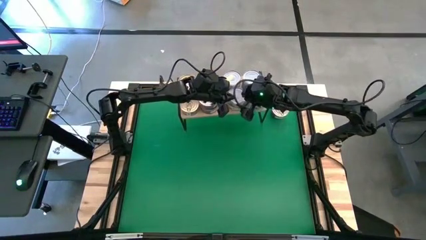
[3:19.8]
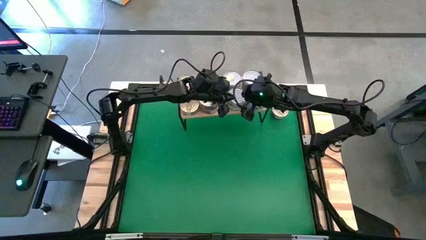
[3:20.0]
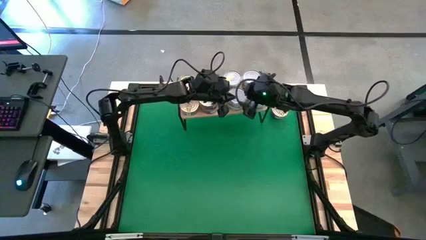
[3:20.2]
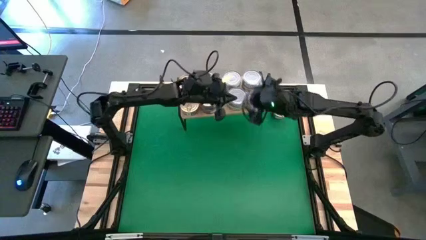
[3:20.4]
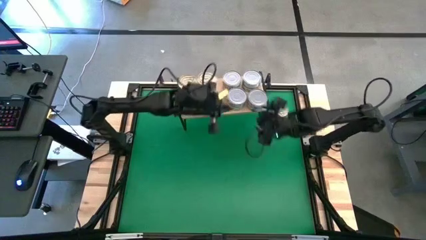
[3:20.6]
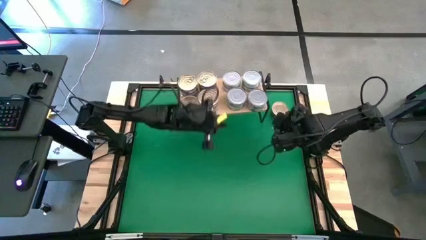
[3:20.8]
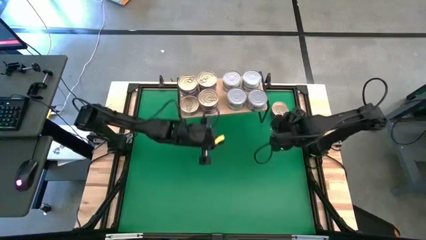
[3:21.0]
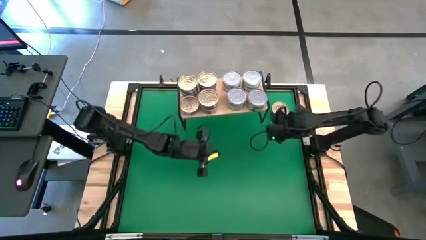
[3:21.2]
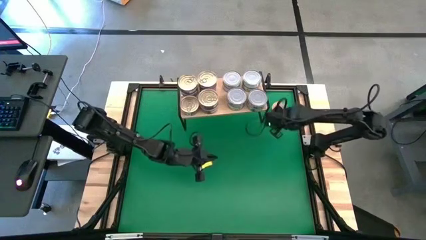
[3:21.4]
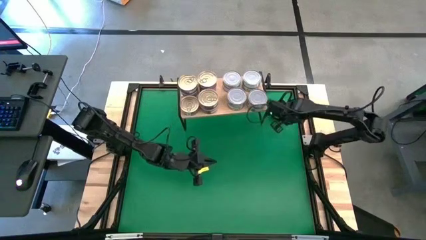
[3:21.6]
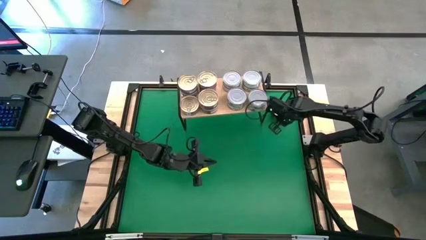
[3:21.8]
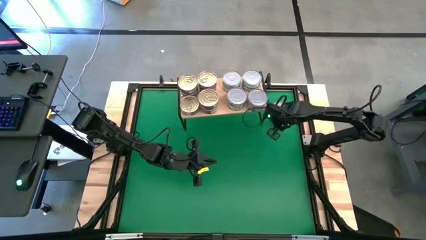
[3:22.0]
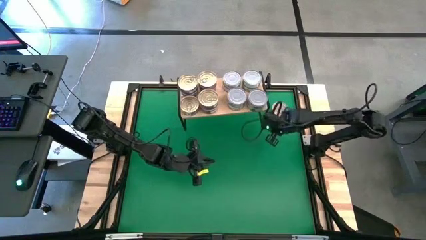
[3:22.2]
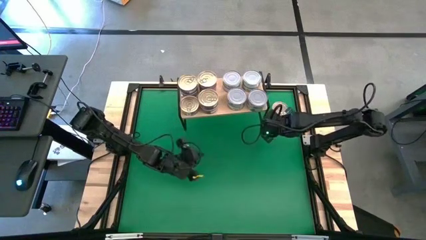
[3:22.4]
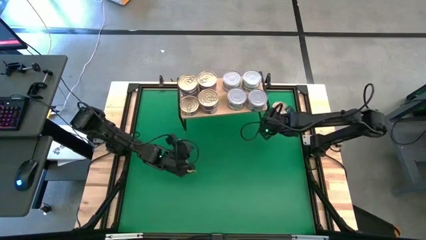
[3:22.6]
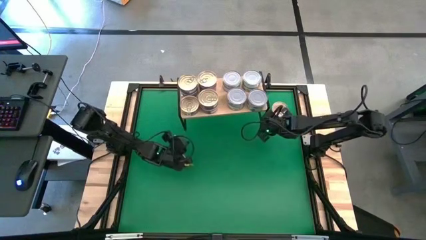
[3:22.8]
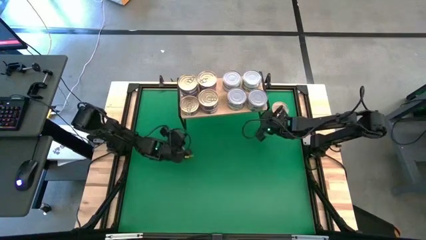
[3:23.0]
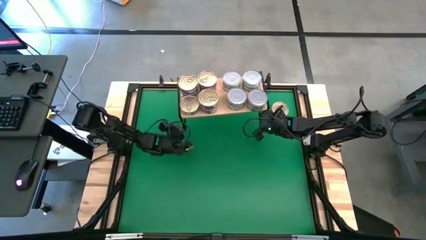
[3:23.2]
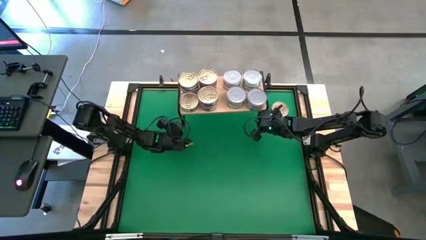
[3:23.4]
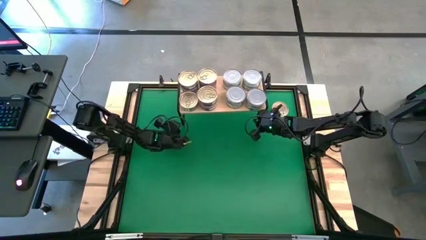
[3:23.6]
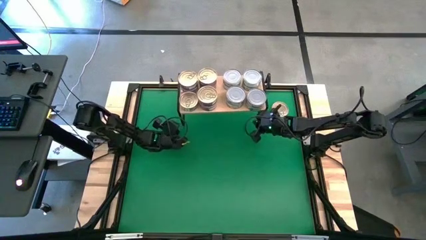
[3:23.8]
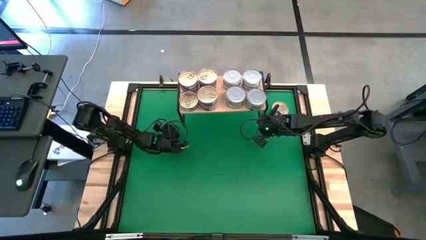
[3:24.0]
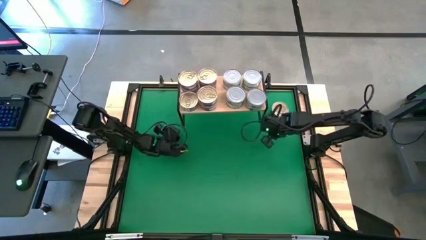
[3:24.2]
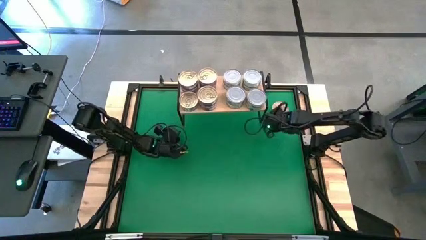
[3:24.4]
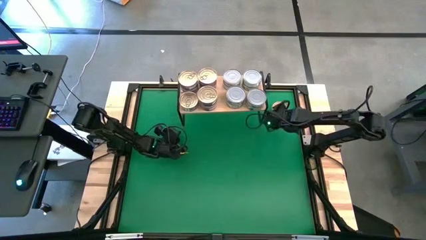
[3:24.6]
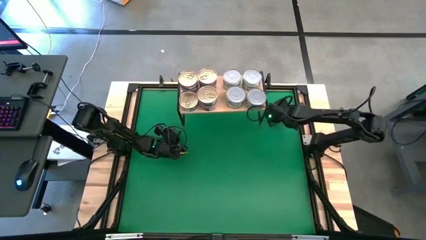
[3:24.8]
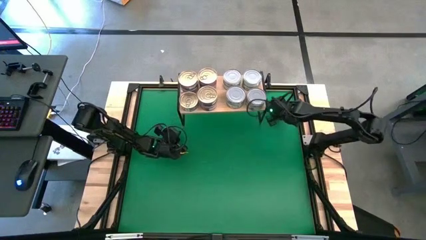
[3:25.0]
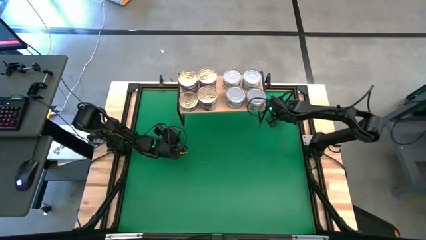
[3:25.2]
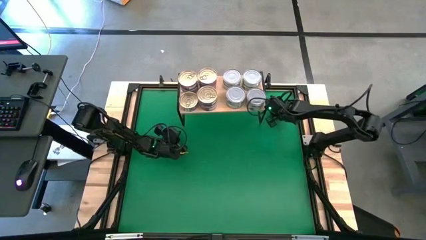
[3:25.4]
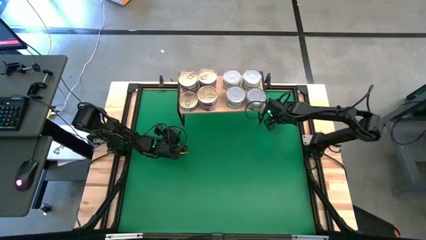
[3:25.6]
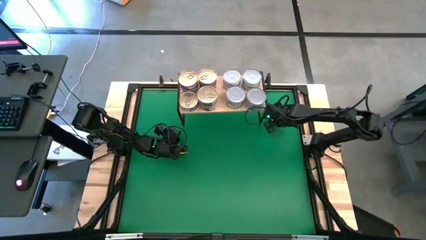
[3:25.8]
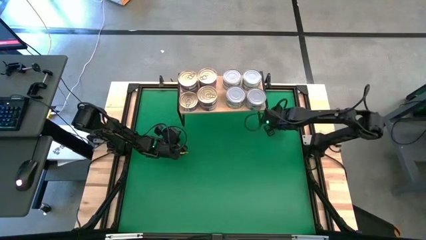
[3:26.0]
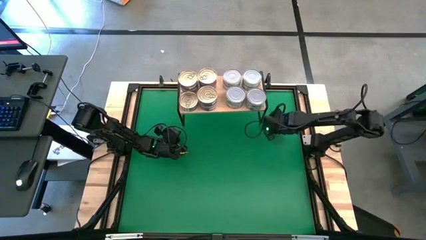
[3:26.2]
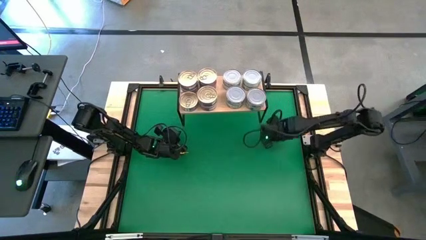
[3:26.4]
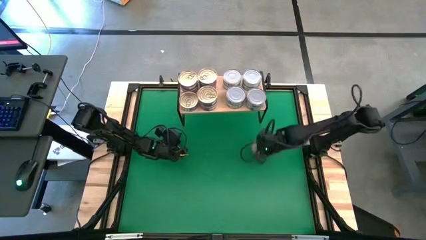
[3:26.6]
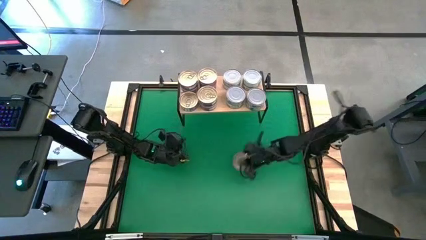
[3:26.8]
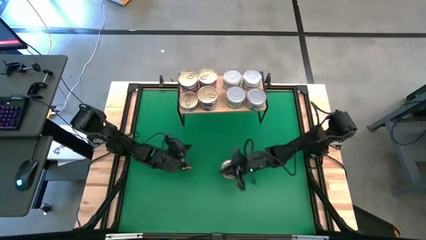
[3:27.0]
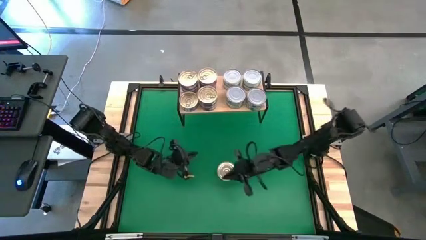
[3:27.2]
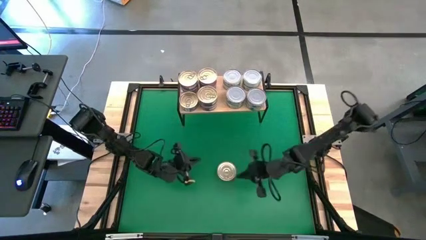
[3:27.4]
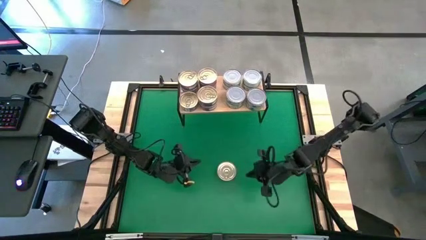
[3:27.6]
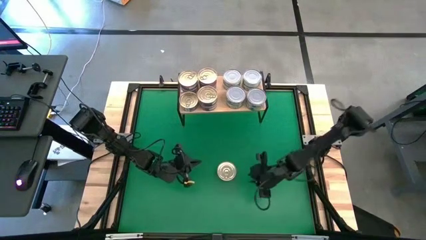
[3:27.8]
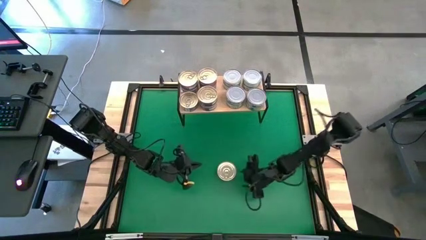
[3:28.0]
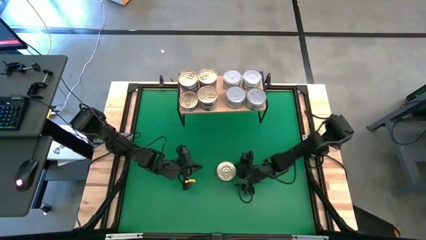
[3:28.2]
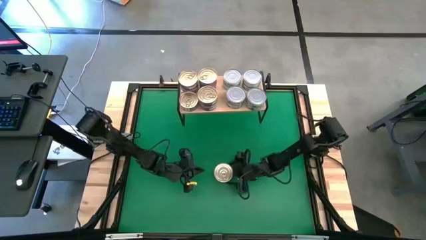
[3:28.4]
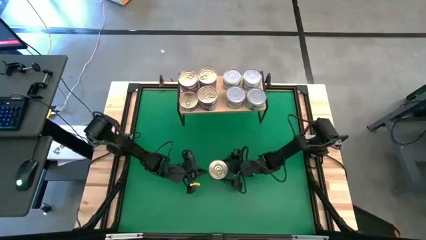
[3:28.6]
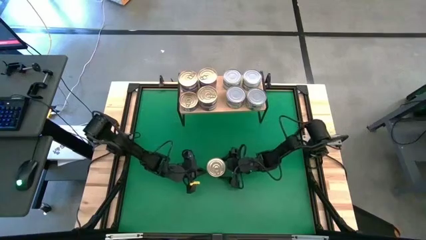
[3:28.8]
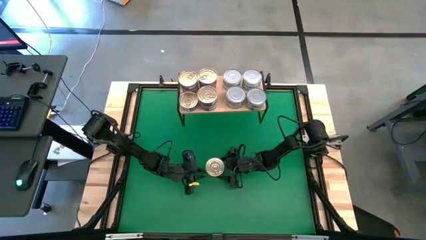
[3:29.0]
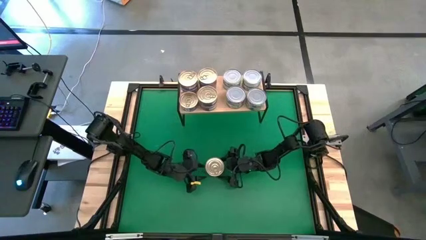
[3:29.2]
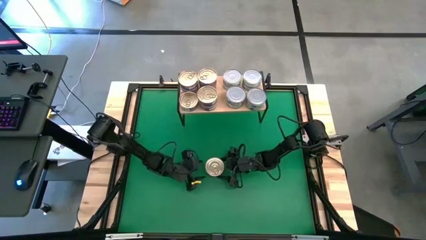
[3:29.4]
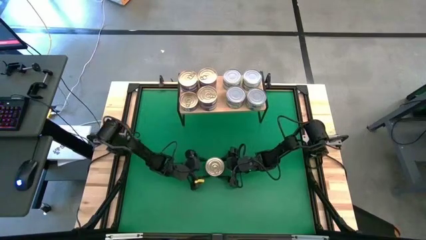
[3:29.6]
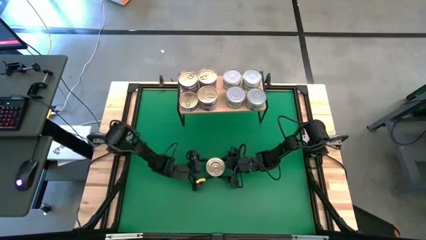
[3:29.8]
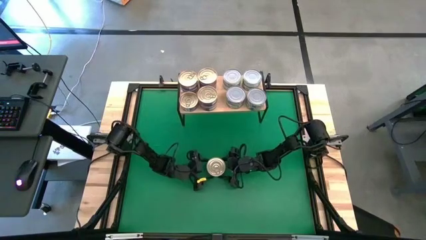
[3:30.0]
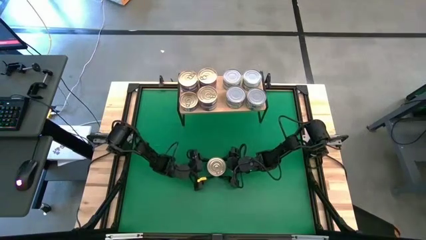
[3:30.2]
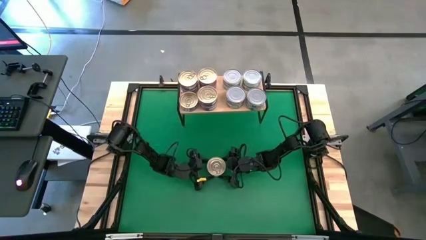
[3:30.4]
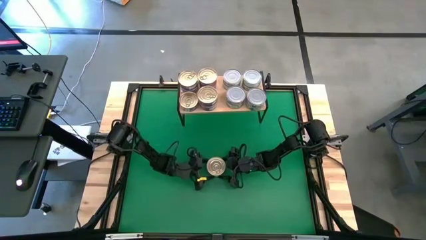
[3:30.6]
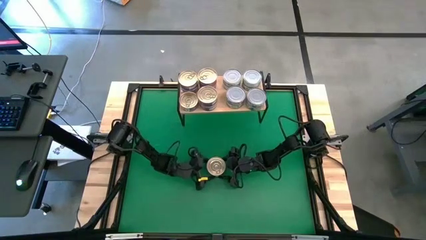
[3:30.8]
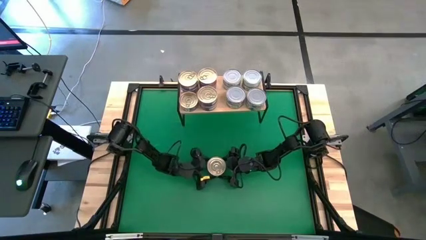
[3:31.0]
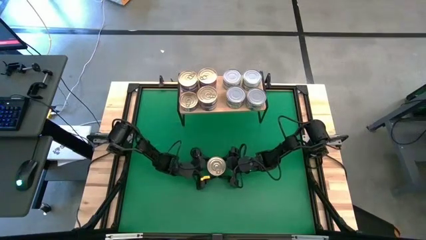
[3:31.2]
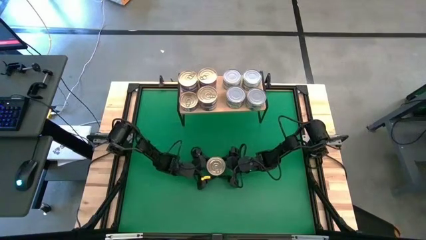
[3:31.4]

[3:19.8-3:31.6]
Task: Stack canned seafood by type on shelf
Stack the blue tuna can on top of the other blue tuna can on the shelf

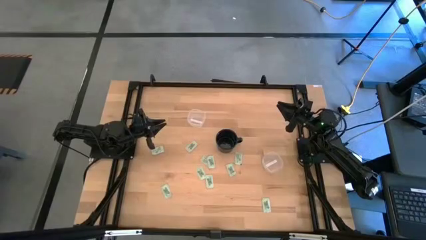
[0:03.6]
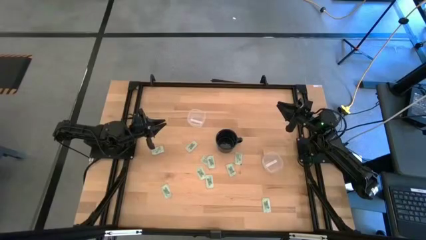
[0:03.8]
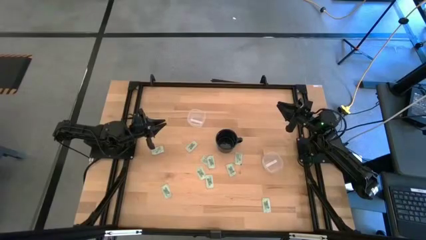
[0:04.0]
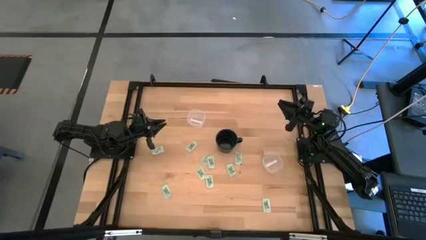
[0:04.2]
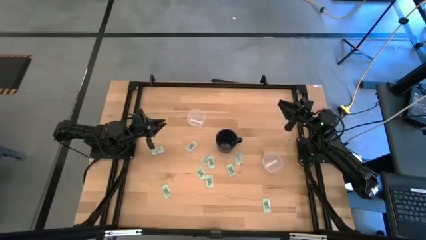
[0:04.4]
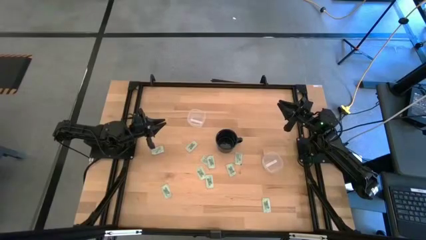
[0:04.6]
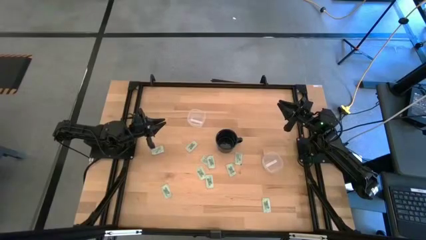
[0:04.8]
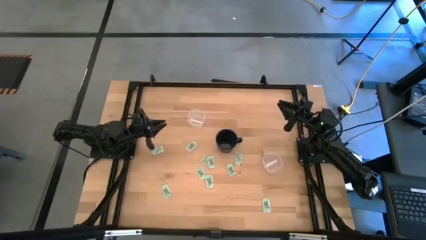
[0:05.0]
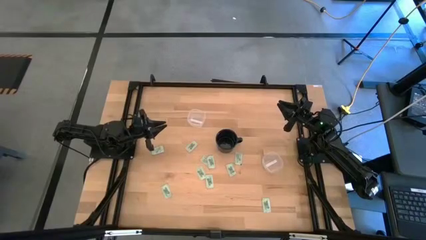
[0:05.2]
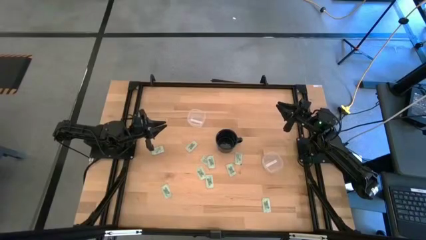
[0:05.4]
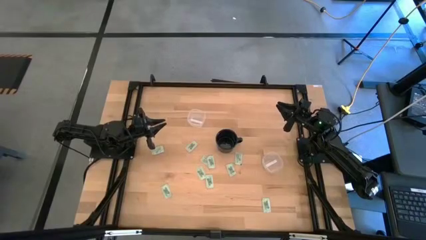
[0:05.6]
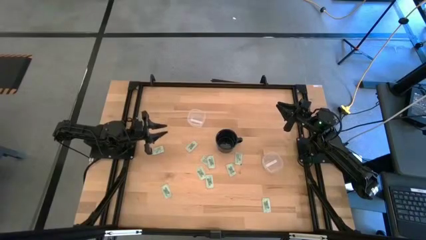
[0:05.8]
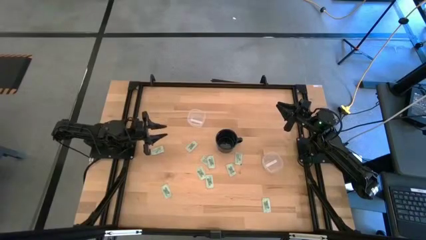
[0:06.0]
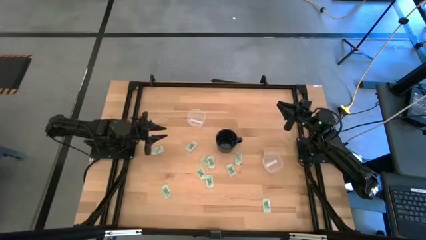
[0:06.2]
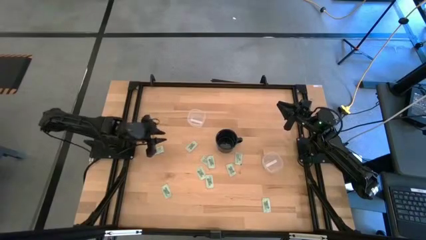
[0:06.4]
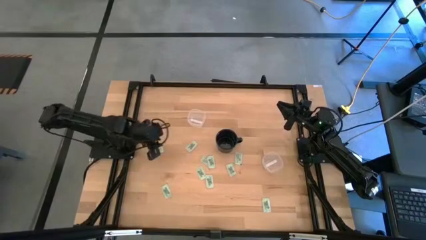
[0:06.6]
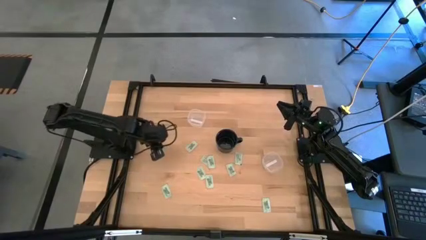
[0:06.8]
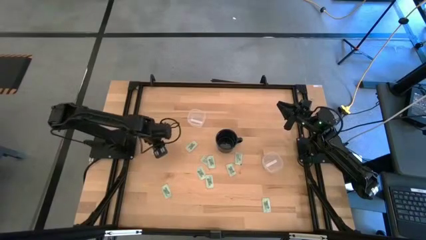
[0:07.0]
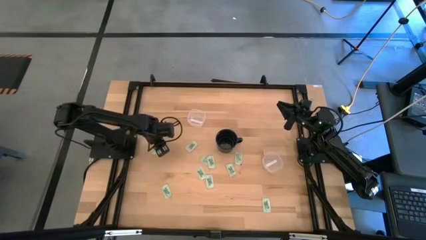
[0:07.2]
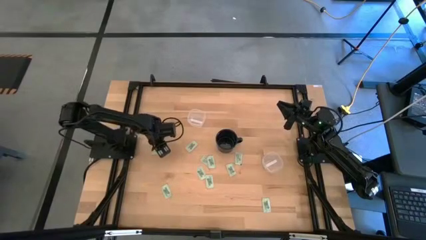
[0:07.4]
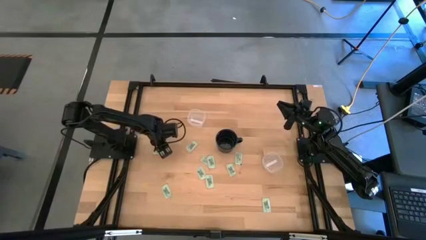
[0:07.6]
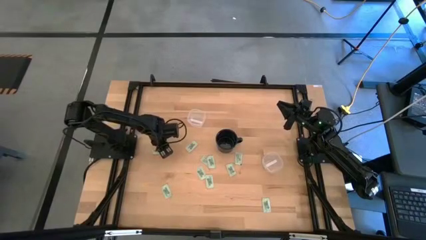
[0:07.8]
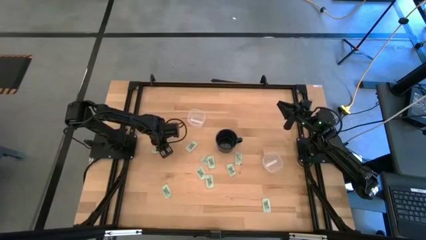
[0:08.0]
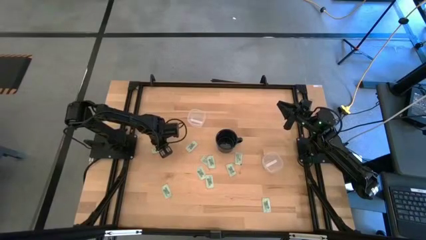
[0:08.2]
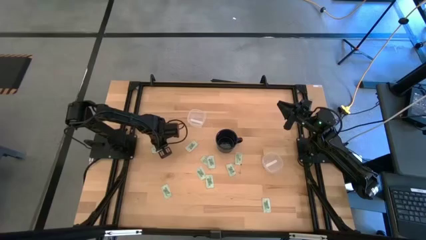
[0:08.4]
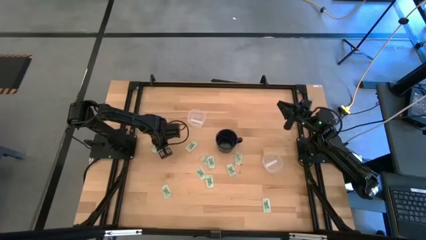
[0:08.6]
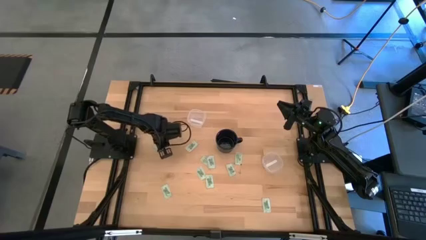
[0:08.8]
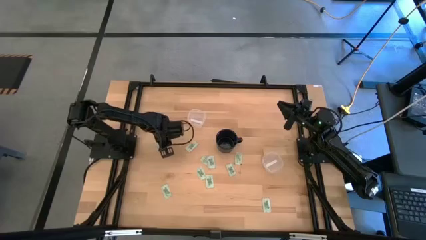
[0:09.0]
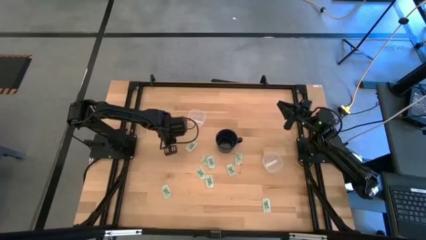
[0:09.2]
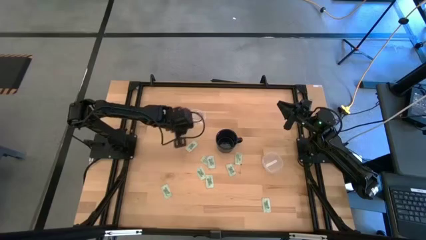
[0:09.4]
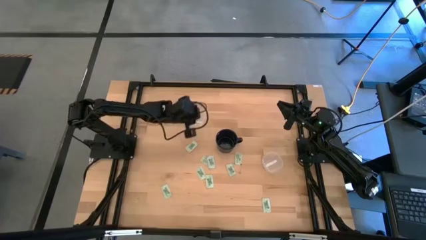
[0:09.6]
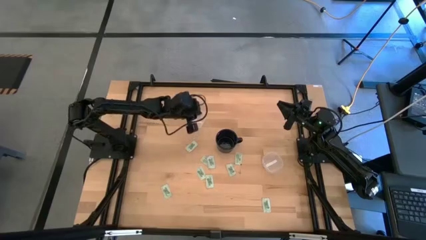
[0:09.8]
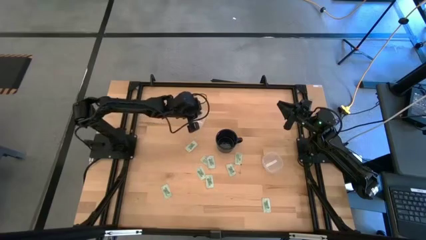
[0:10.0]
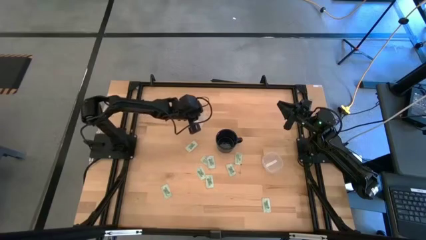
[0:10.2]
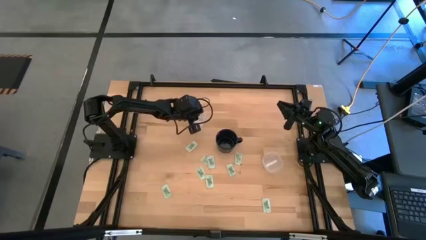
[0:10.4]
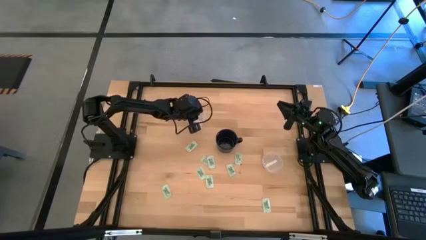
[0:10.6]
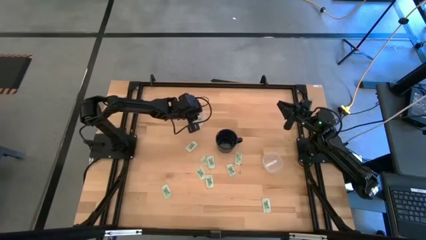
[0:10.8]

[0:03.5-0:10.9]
Task: Pick and place items into bin
Put the green stevia packet into the top transparent bin
